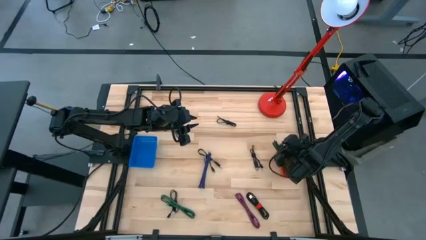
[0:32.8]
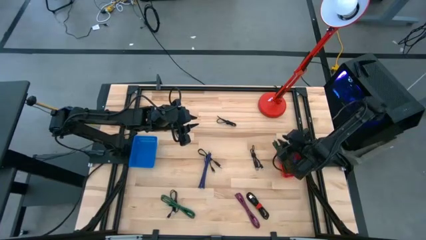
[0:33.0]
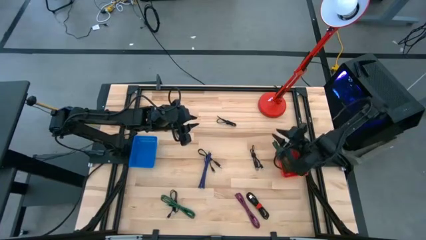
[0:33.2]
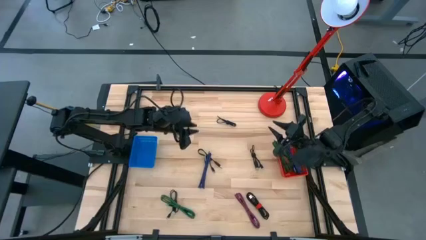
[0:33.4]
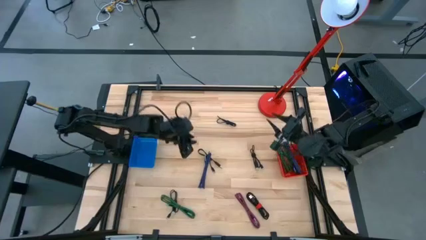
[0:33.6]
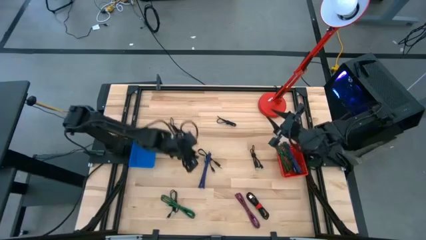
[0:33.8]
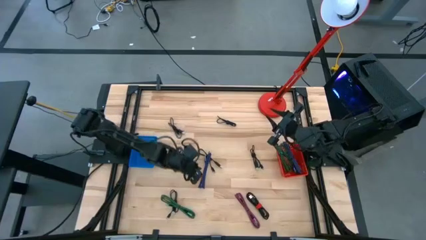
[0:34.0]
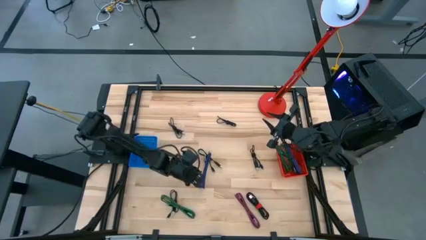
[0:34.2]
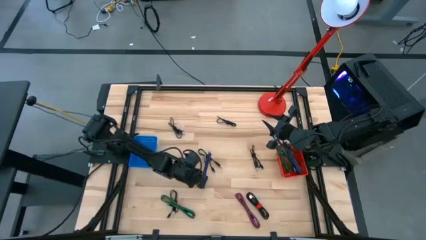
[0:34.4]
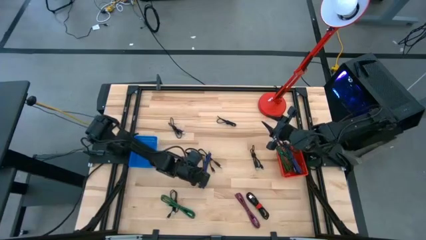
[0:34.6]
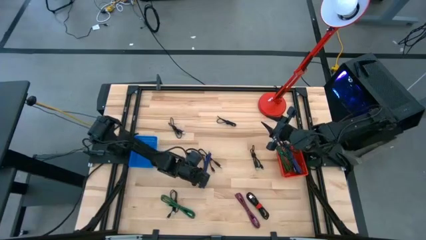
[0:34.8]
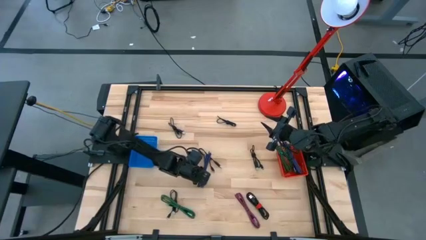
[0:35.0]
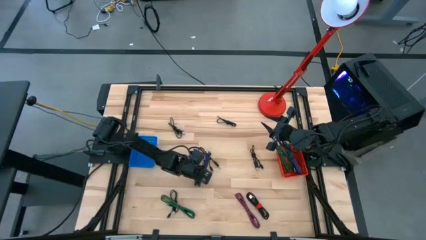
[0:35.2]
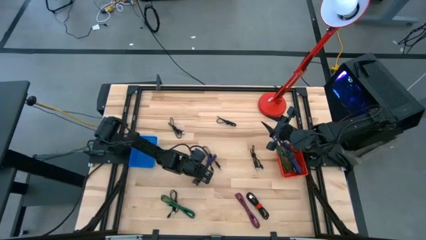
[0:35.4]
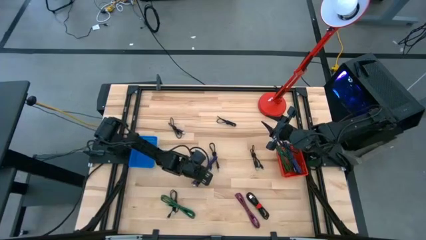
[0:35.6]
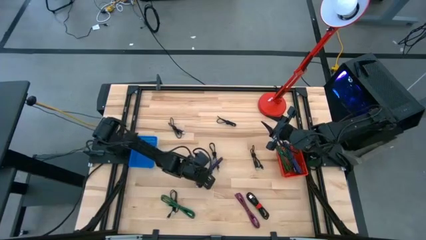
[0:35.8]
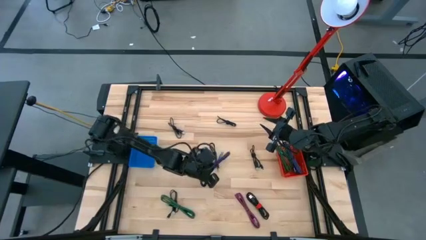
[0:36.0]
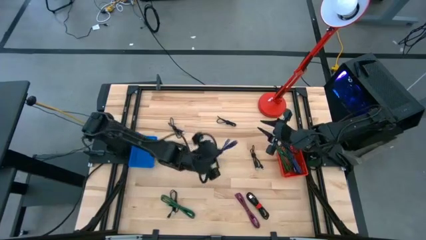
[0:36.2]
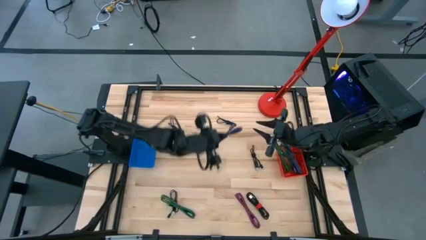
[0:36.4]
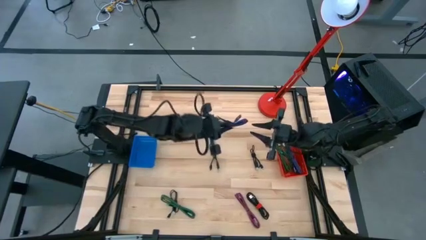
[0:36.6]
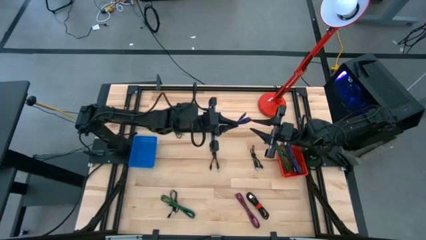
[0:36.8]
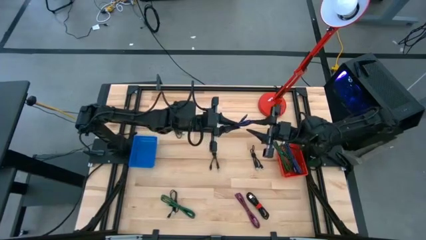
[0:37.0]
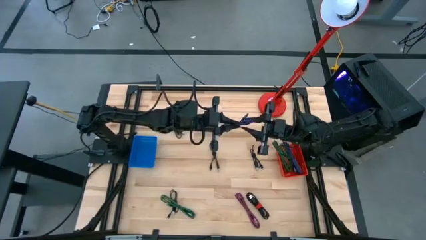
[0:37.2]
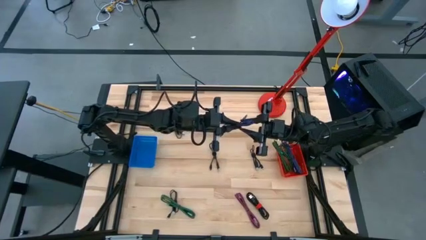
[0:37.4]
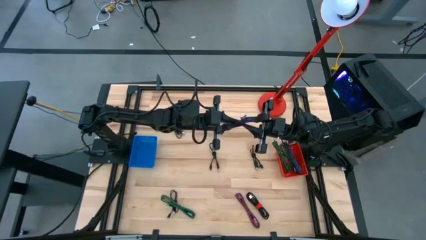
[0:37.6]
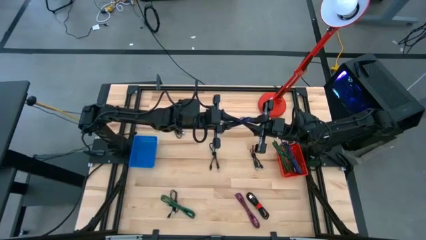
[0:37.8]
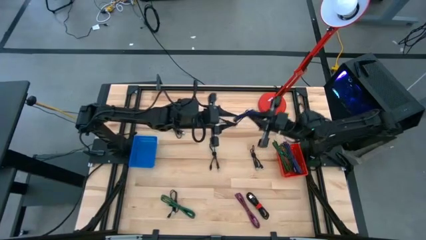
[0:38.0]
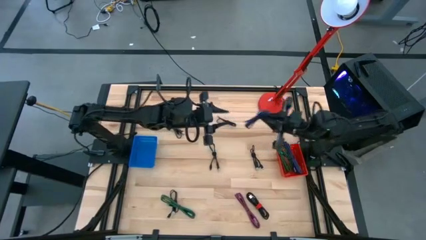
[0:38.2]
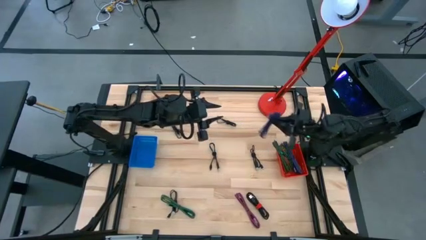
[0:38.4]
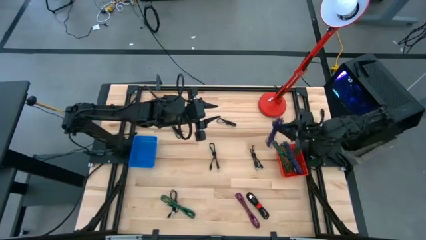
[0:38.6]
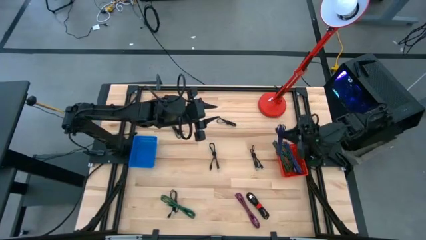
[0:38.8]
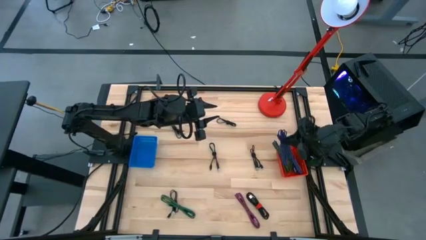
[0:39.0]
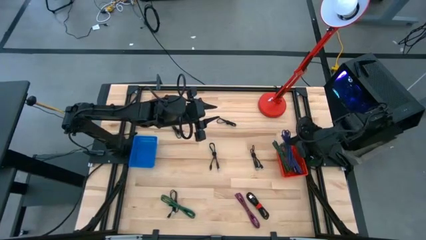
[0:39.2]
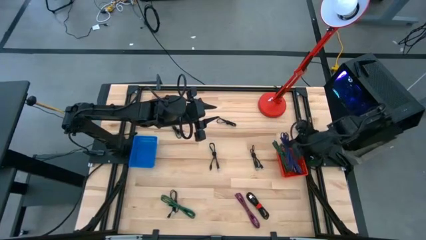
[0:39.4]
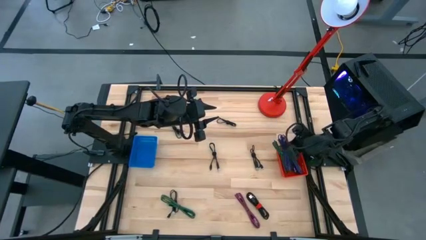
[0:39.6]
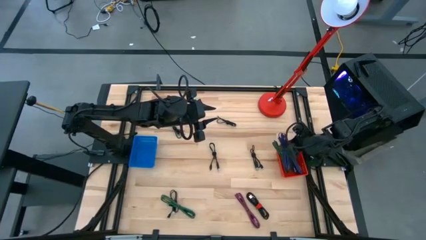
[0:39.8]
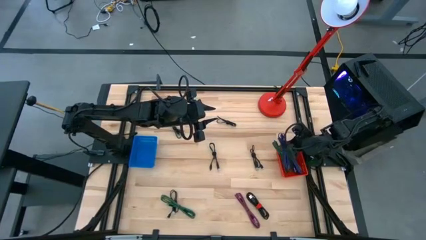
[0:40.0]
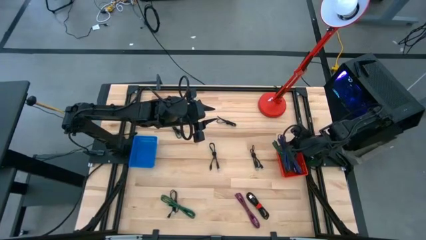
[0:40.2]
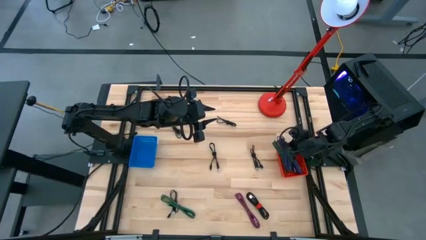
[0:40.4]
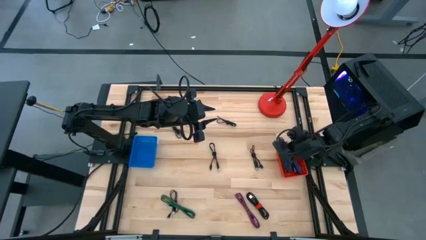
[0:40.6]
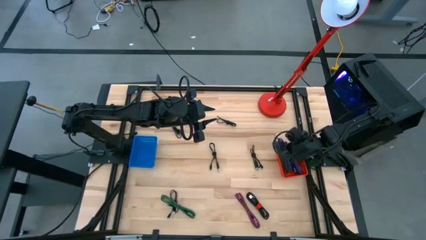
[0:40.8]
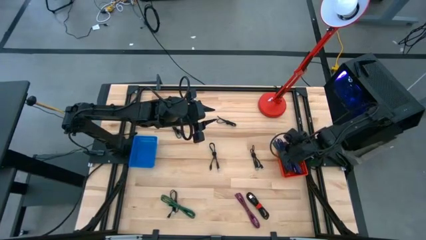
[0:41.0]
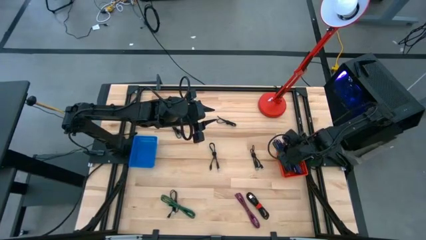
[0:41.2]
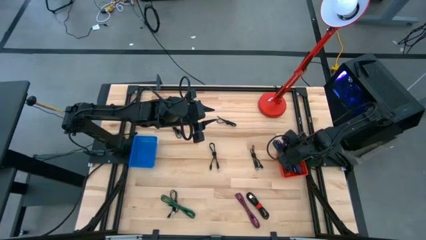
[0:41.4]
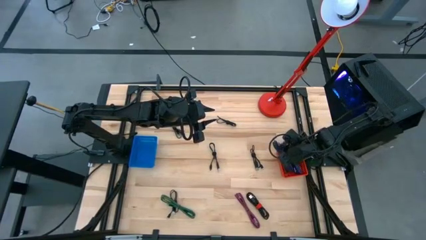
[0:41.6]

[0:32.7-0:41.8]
Task: Pick & Place USB Port
Put the black and violet charger cable into the red basket

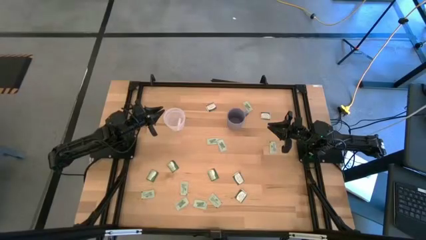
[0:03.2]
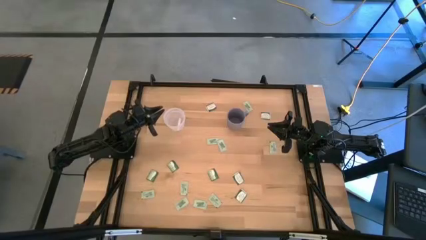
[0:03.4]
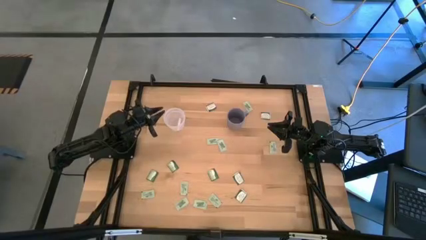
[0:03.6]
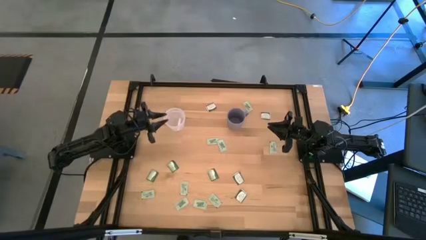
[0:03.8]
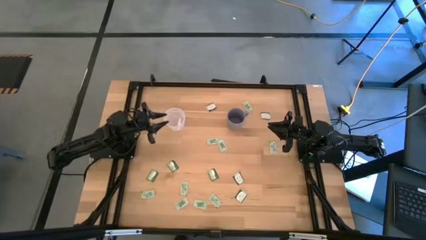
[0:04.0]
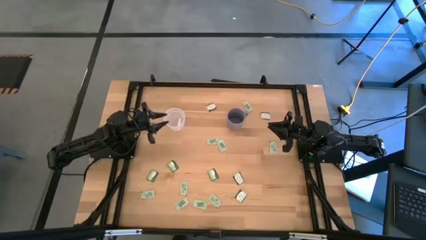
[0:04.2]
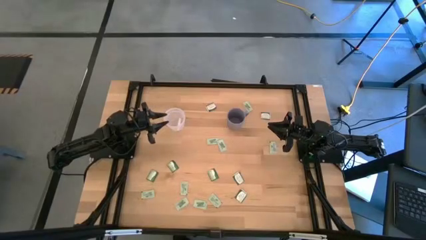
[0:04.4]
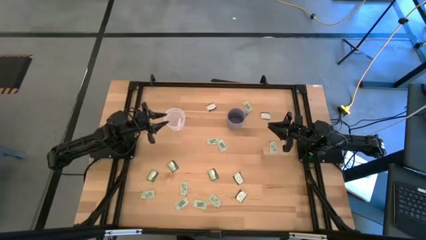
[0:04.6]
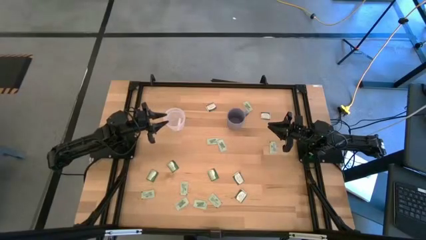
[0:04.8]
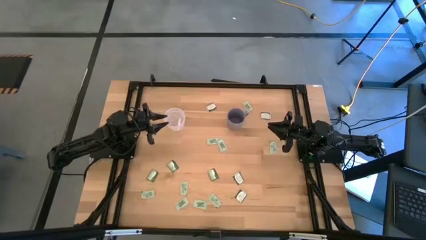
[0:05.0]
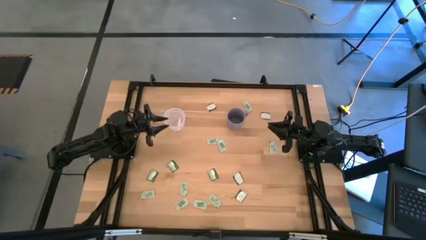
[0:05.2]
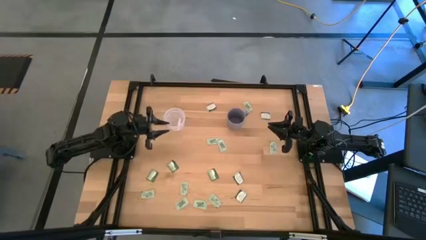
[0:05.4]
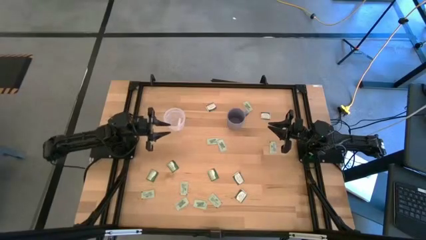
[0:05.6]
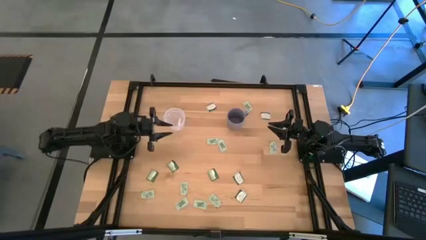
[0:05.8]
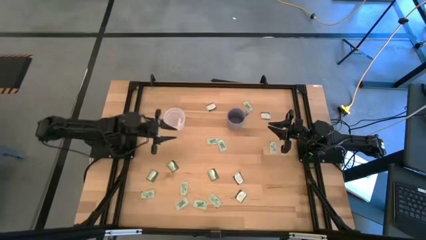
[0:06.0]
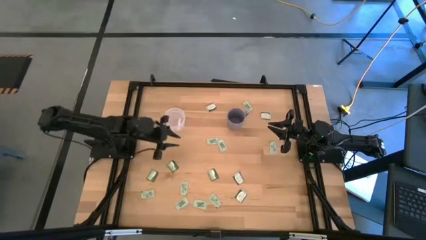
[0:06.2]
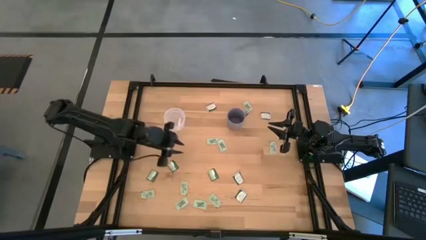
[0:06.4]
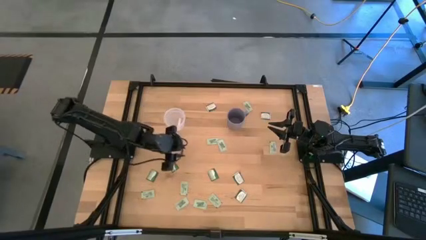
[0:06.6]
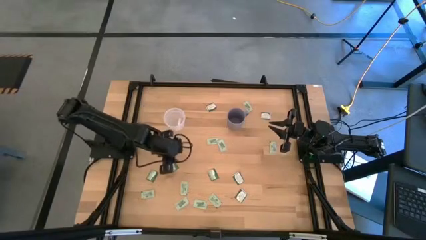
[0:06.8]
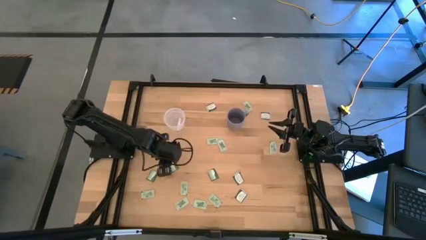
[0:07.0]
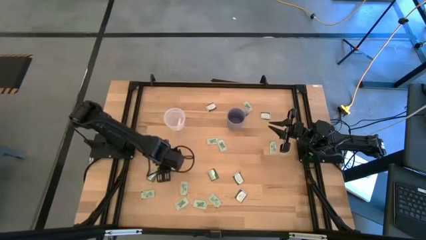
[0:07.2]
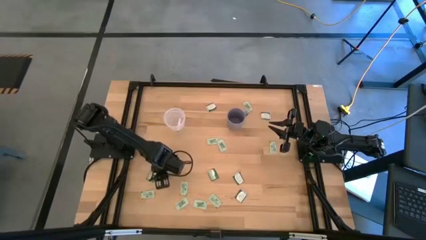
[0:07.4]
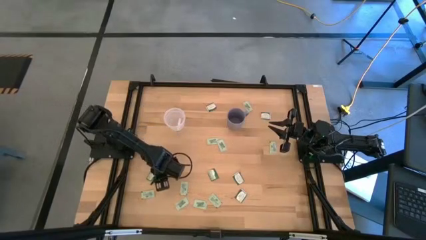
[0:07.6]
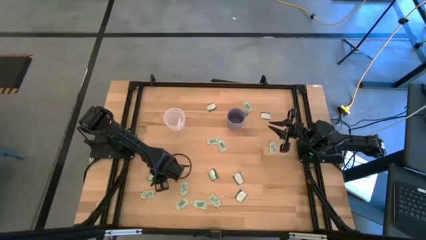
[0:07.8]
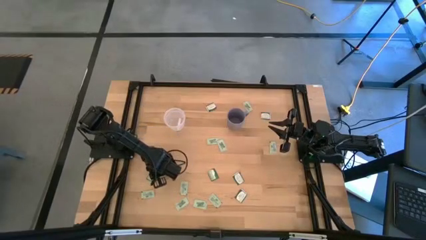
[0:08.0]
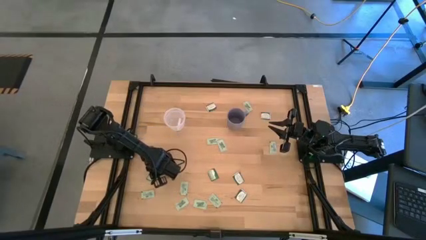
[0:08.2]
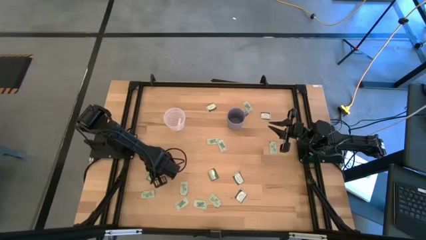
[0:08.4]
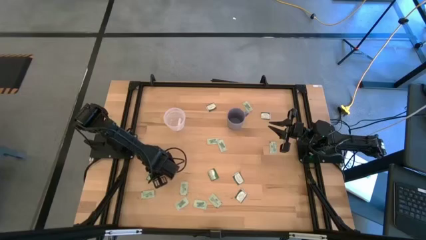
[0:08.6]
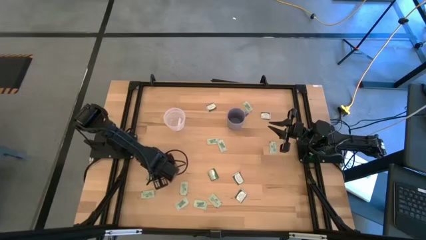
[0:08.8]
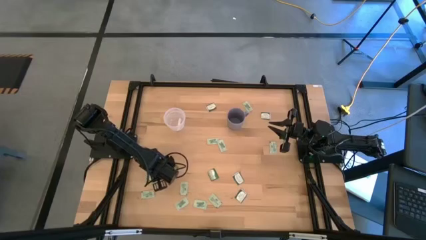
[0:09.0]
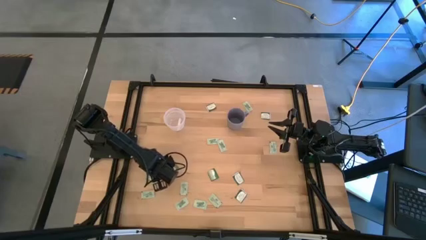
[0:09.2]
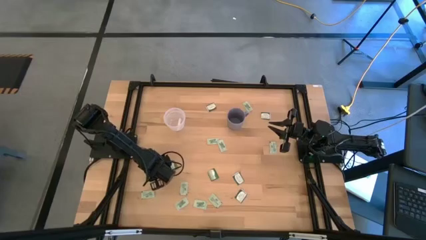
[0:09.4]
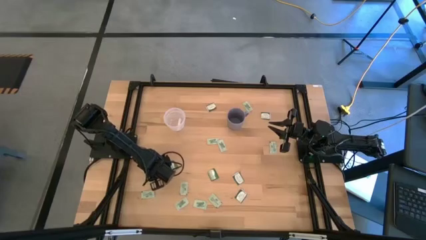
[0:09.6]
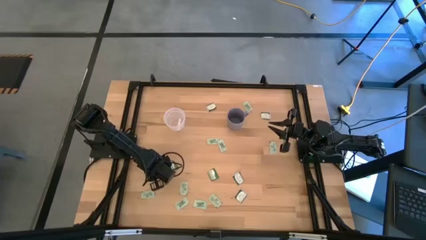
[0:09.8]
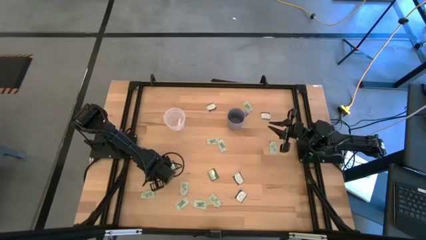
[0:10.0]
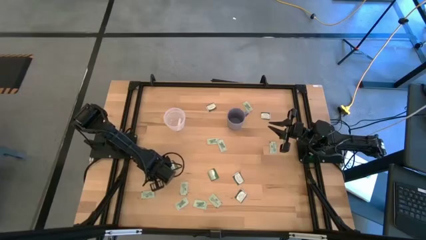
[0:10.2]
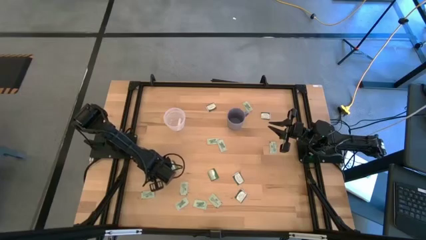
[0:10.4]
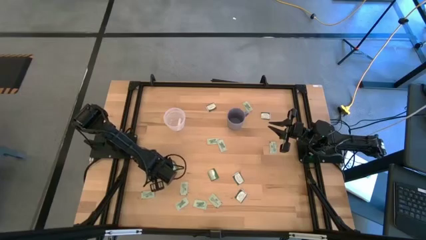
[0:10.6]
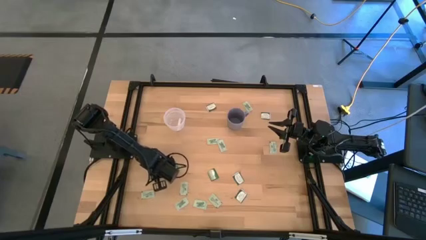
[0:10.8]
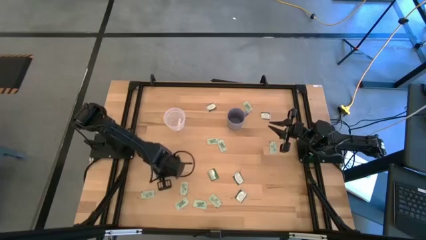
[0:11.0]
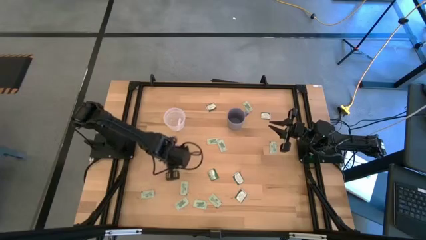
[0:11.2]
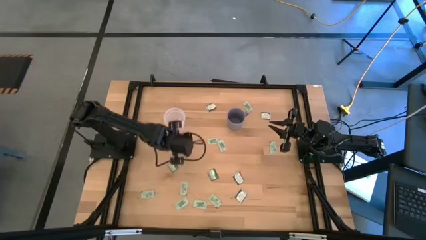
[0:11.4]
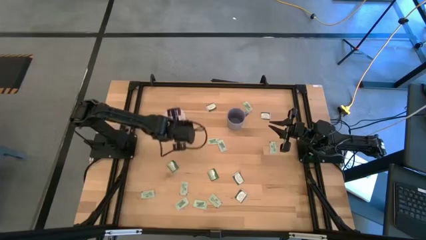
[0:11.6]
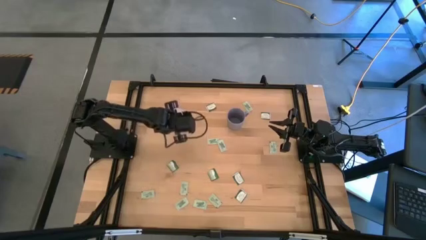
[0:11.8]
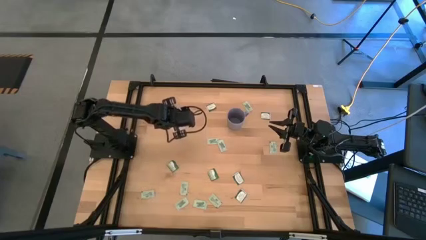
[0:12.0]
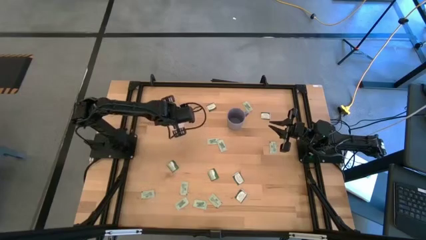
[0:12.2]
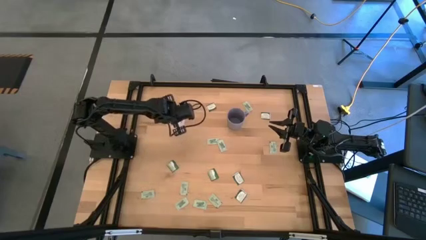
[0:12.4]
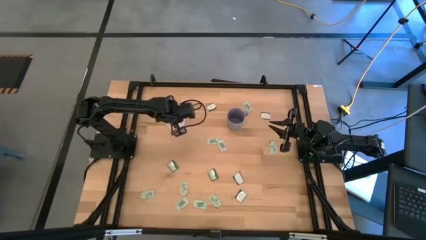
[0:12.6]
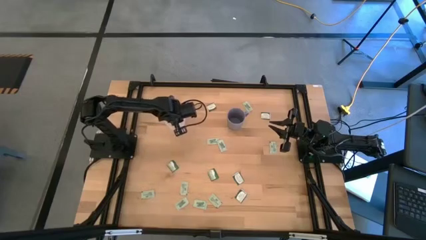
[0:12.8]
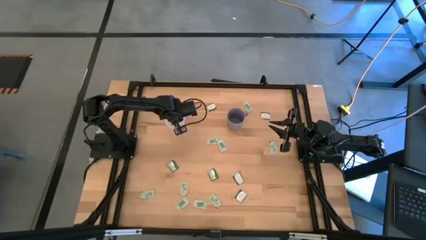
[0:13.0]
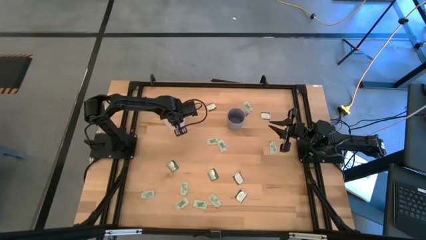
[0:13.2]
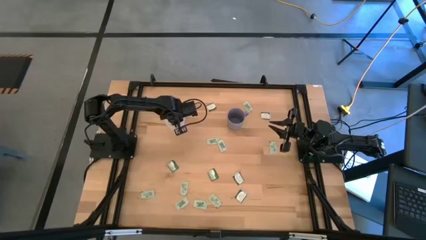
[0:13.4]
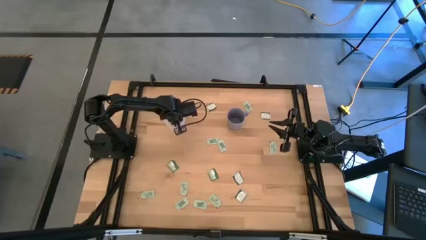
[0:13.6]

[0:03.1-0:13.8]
Task: Pick and place Stevia / Truvia into bins
Put the green stevia packet into the transparent container
